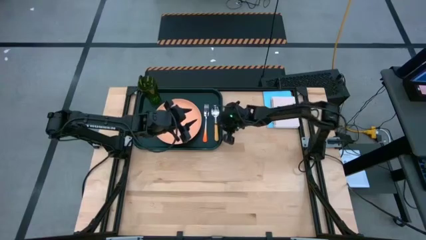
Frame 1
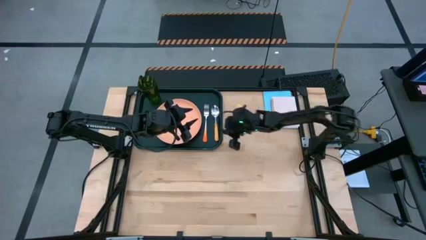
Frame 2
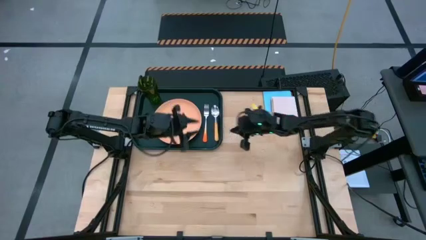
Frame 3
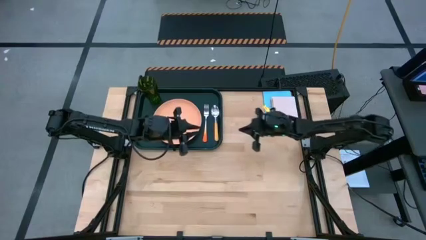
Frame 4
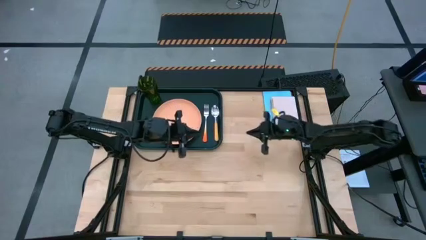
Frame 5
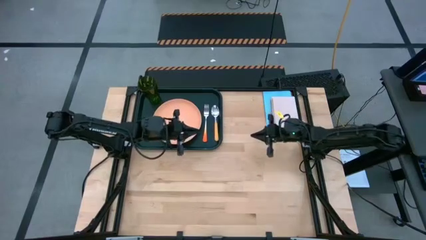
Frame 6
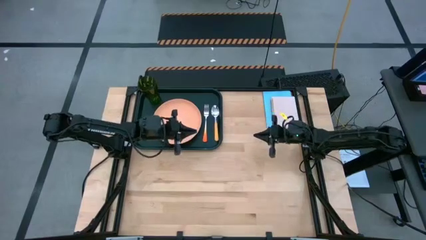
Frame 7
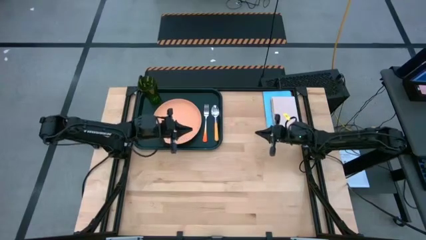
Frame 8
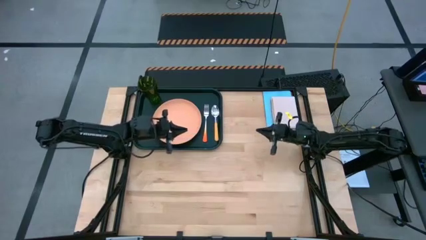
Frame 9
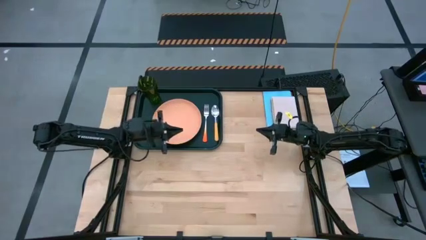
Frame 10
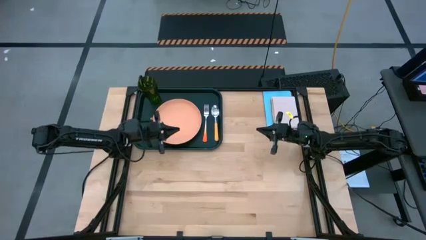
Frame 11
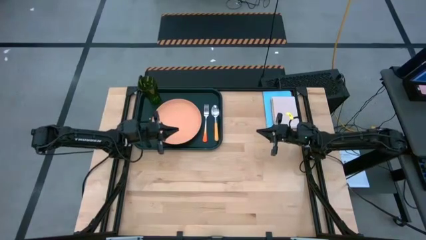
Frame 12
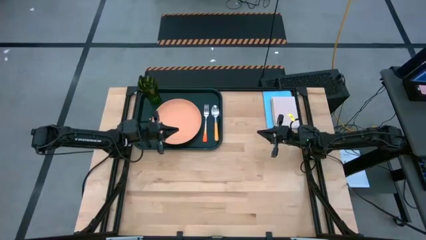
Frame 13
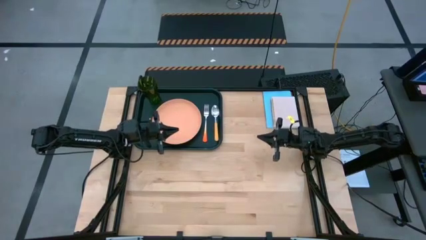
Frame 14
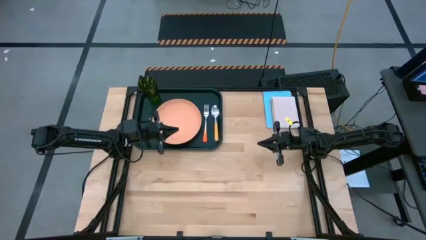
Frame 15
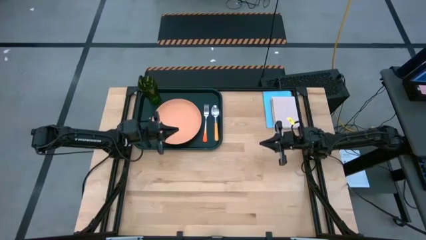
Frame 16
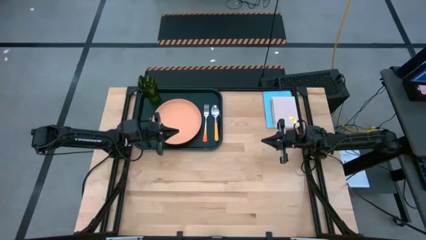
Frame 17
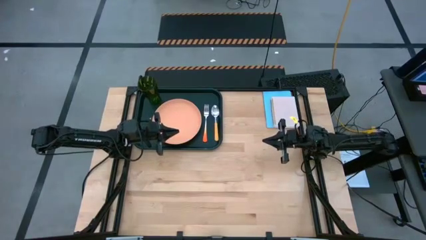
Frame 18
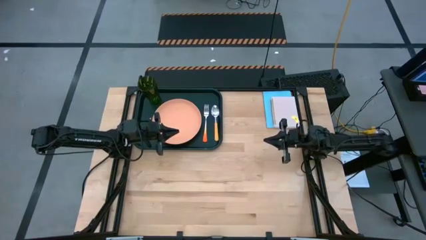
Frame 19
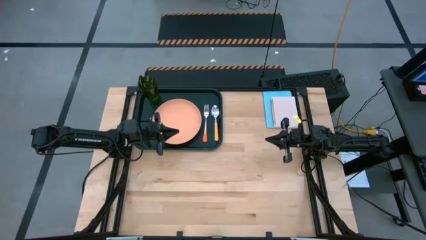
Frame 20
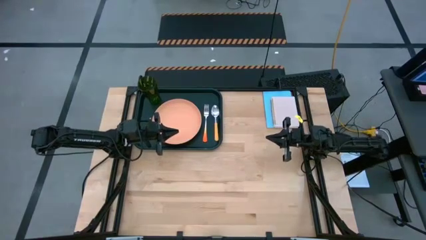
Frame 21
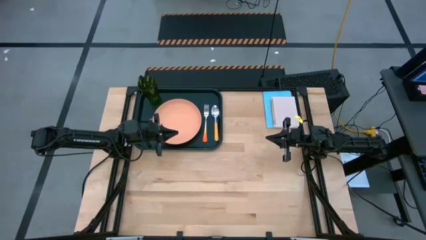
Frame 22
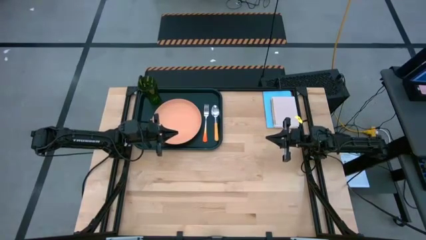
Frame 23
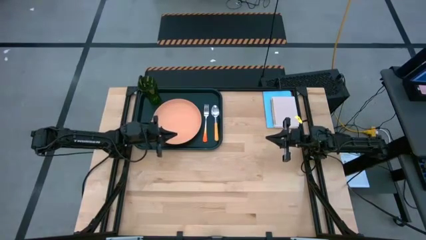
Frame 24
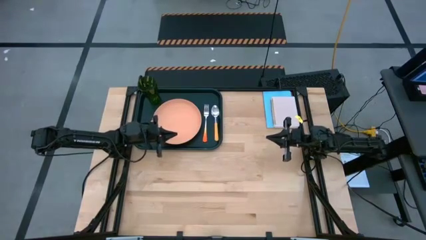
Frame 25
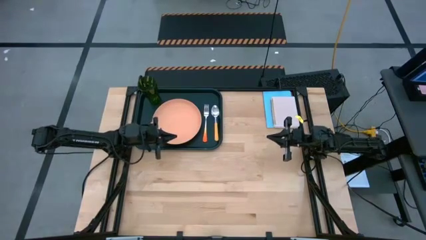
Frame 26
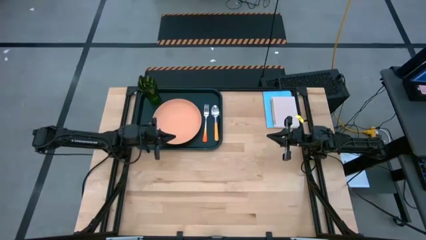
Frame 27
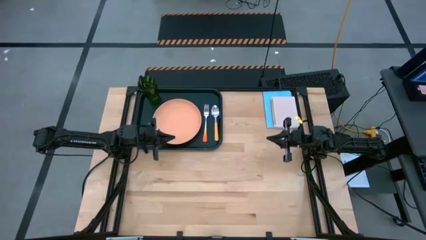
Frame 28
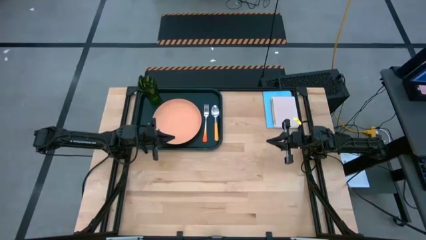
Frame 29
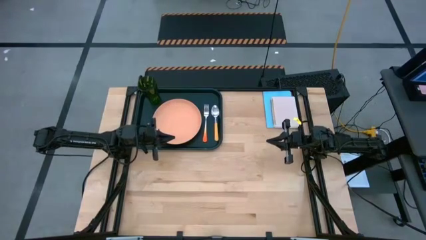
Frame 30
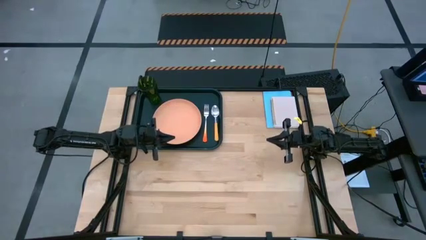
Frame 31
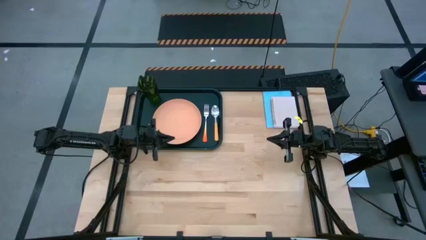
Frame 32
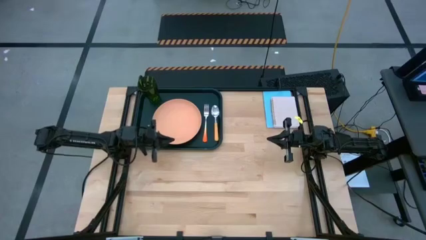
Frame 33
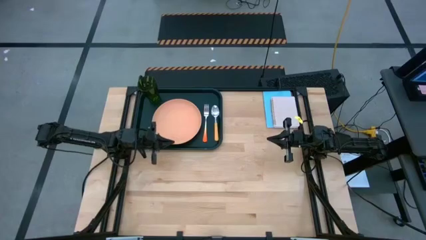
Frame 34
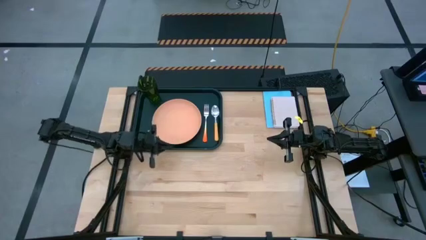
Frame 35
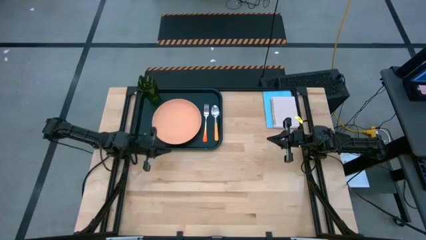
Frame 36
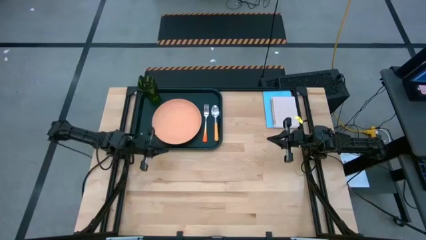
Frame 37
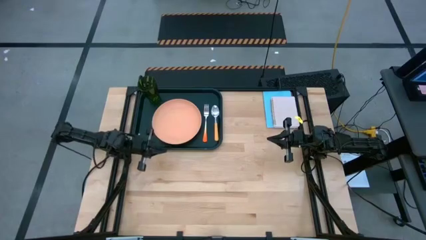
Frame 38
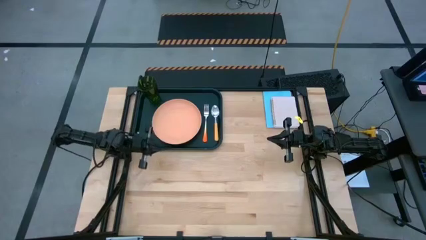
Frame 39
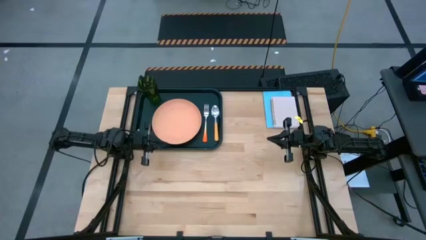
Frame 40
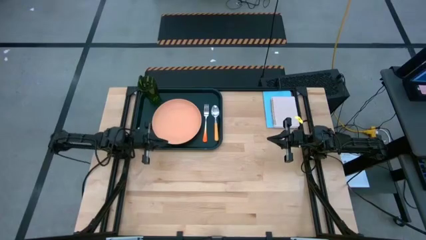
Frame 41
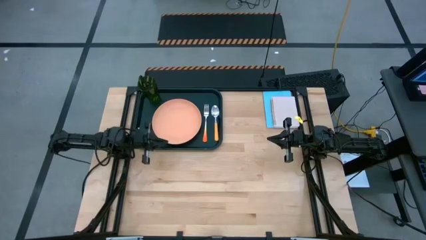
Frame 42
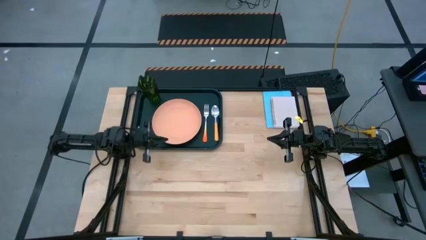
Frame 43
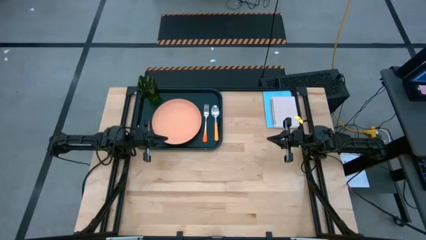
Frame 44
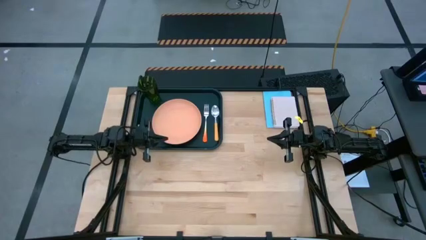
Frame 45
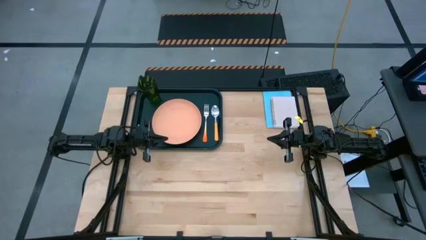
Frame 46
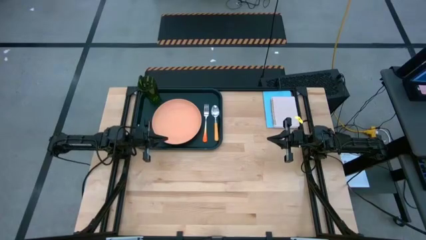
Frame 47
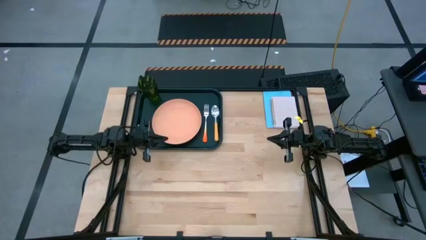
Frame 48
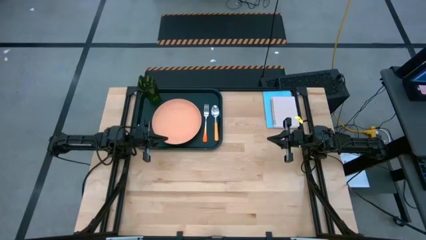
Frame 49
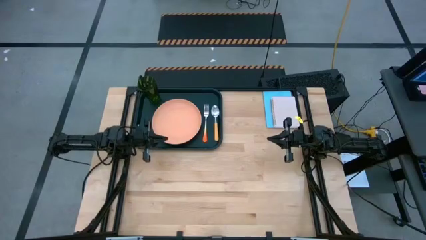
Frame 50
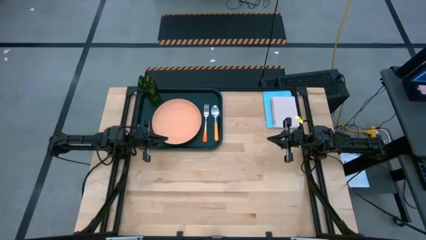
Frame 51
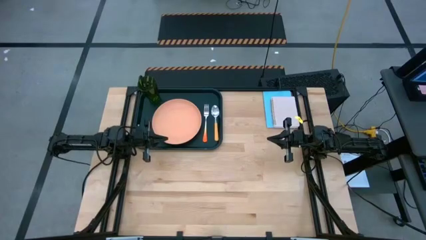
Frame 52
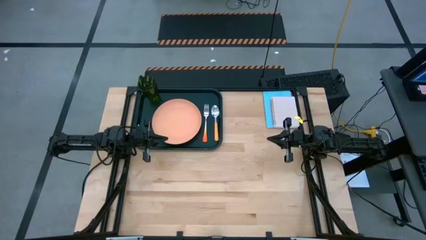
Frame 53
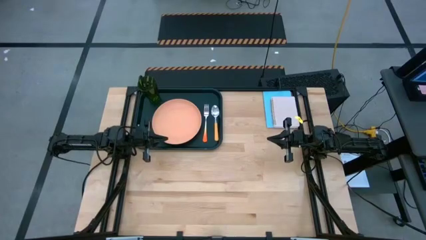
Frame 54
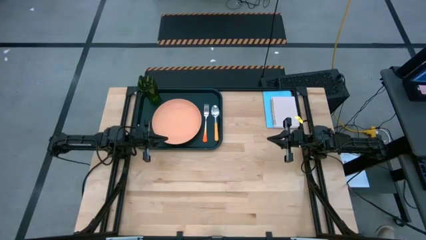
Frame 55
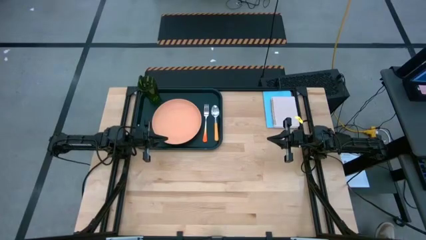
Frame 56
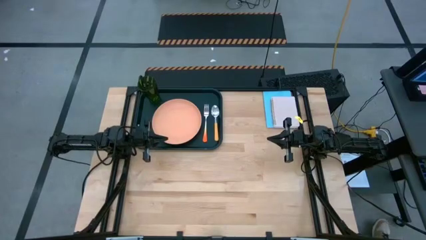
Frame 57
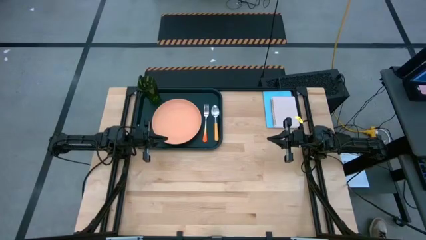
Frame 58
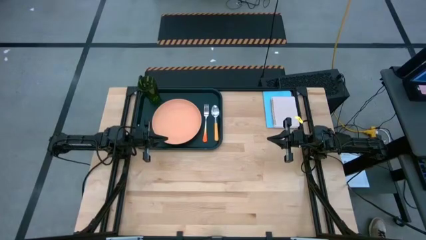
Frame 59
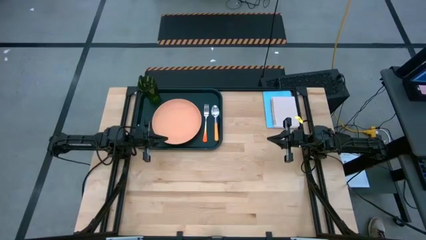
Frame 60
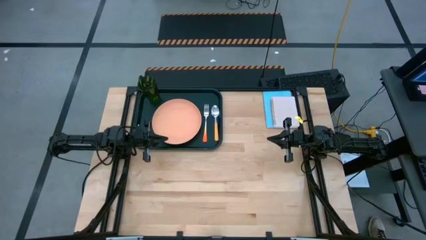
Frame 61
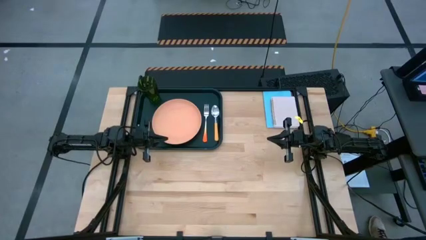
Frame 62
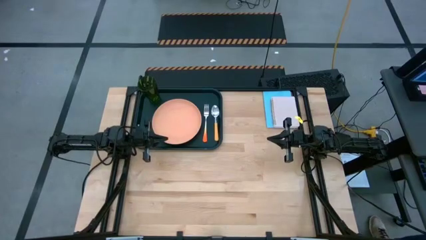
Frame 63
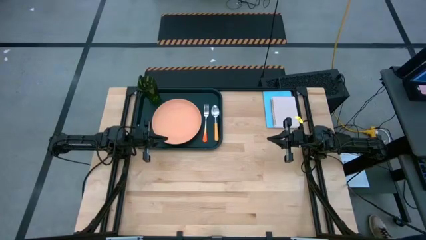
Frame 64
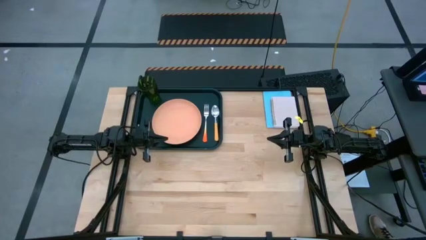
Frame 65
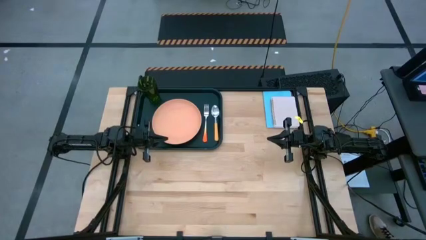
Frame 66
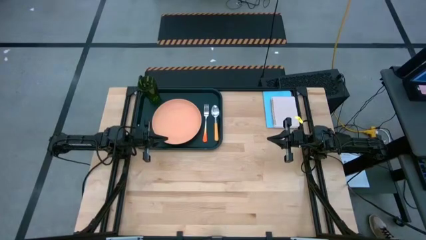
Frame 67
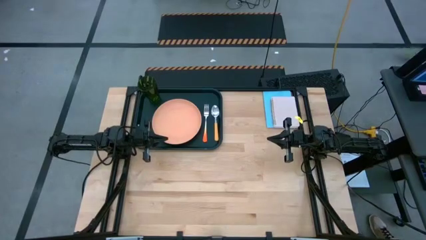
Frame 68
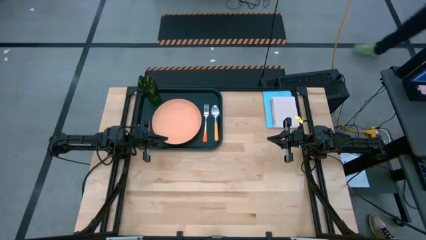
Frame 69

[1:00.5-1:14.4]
Task: Pick and place plate/cup/fork/spoon on tray
Return to Home Position
